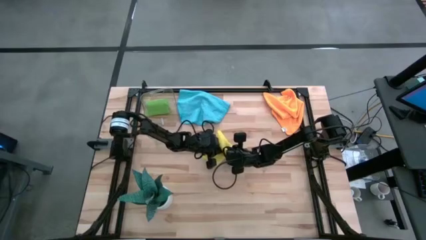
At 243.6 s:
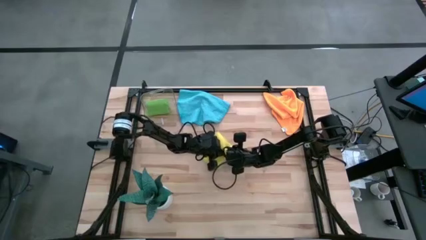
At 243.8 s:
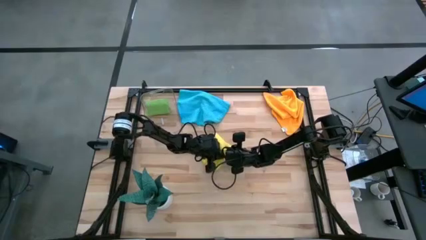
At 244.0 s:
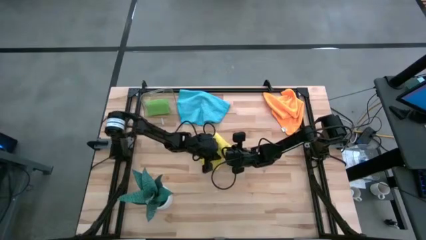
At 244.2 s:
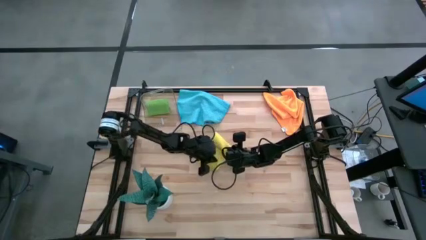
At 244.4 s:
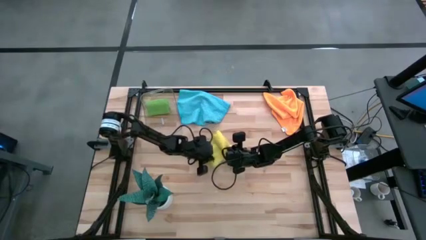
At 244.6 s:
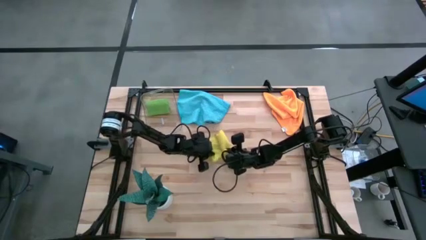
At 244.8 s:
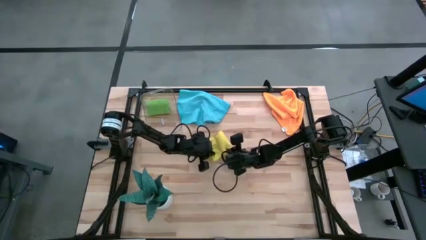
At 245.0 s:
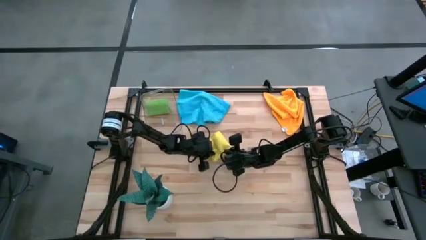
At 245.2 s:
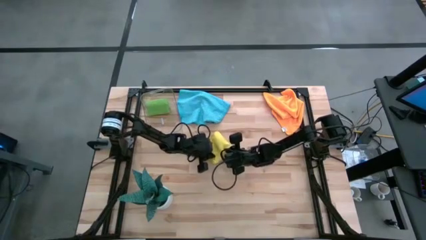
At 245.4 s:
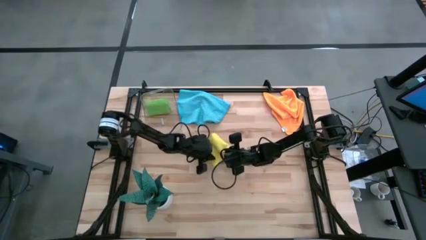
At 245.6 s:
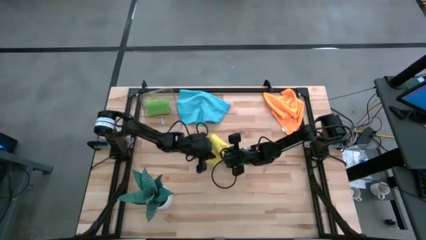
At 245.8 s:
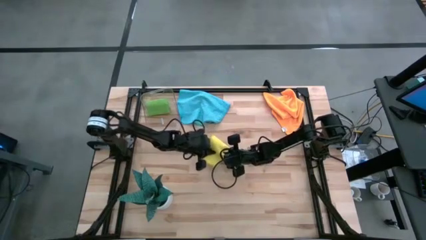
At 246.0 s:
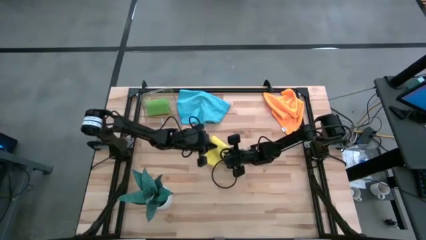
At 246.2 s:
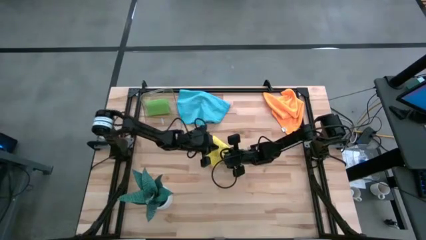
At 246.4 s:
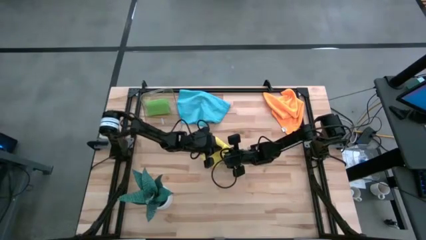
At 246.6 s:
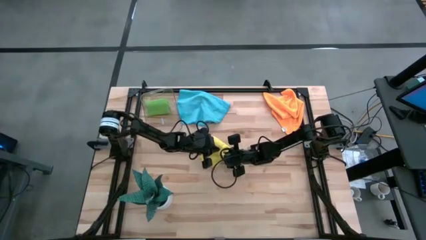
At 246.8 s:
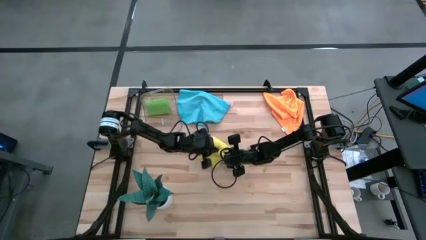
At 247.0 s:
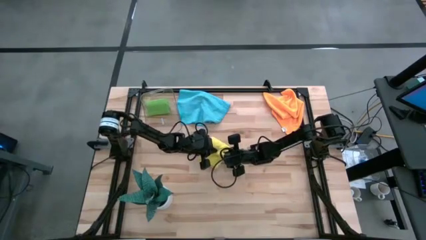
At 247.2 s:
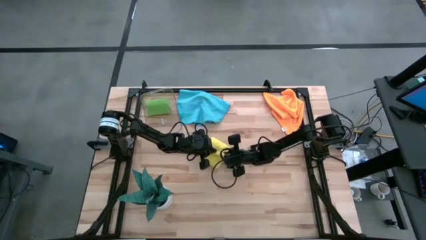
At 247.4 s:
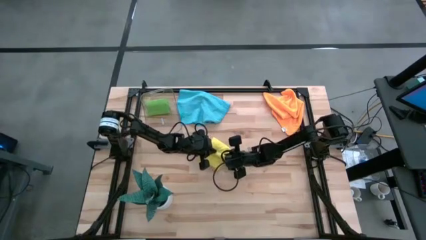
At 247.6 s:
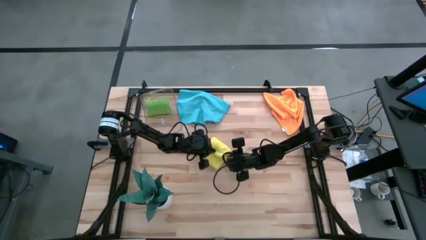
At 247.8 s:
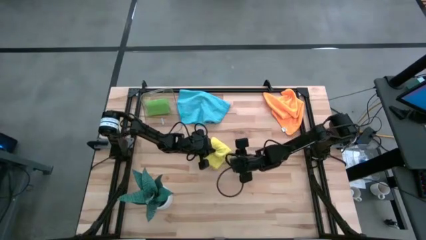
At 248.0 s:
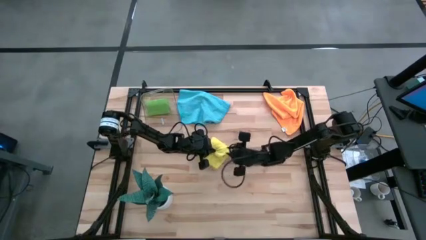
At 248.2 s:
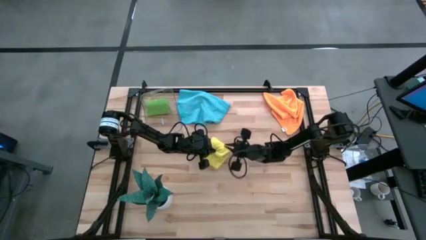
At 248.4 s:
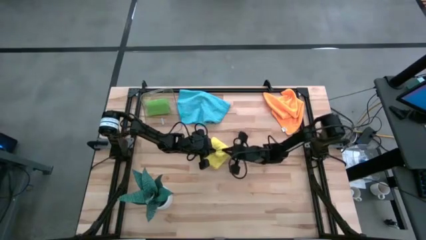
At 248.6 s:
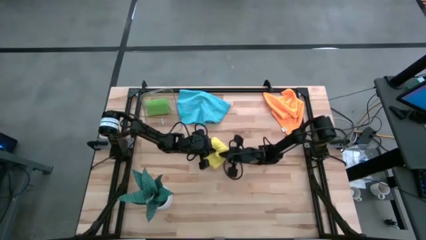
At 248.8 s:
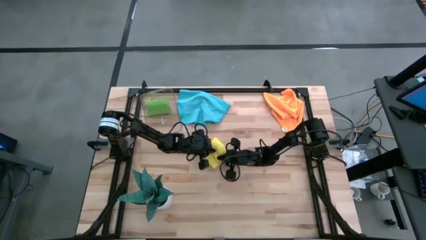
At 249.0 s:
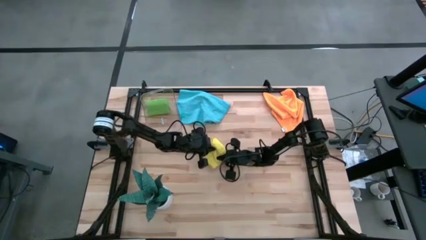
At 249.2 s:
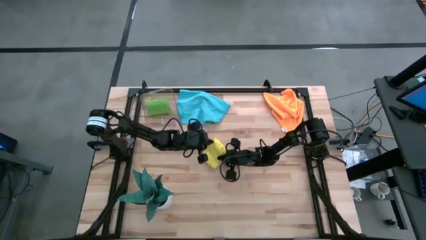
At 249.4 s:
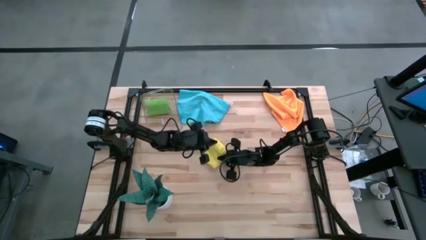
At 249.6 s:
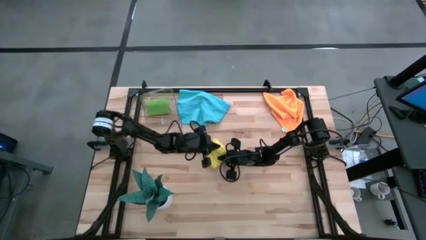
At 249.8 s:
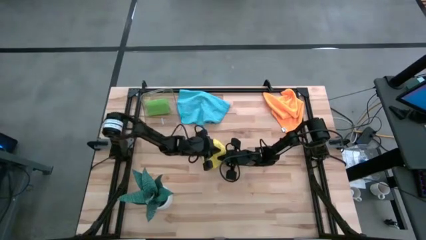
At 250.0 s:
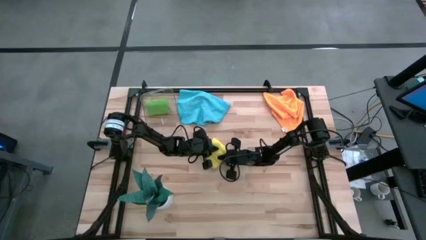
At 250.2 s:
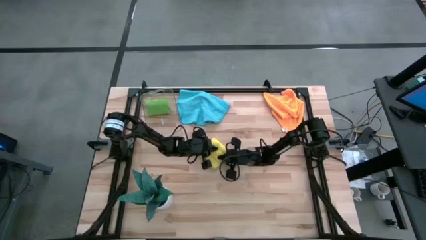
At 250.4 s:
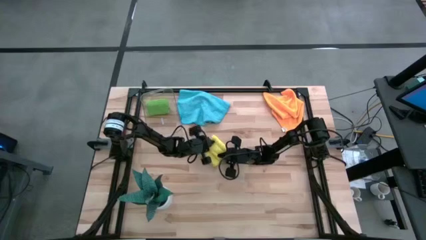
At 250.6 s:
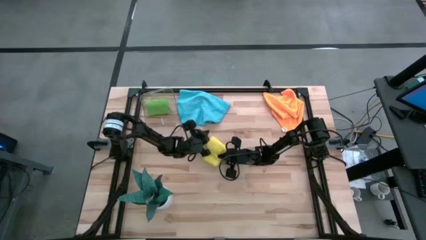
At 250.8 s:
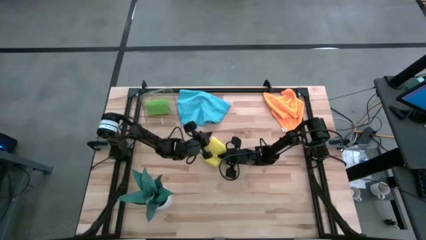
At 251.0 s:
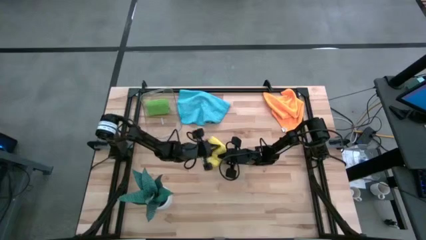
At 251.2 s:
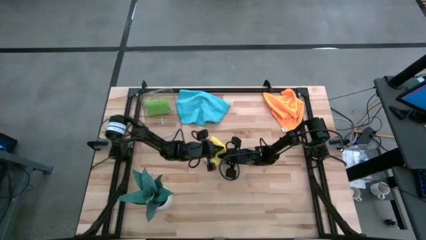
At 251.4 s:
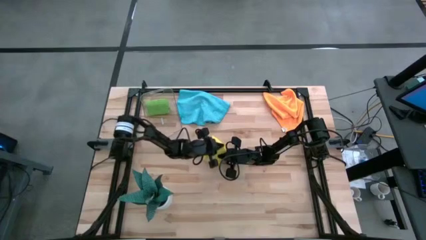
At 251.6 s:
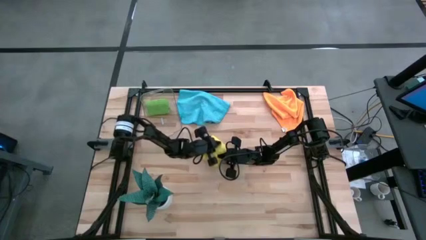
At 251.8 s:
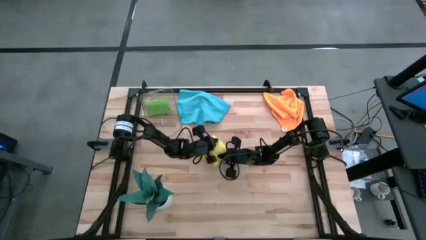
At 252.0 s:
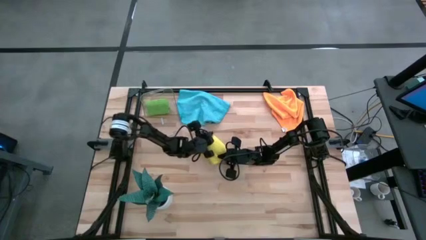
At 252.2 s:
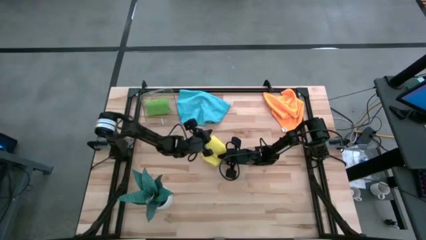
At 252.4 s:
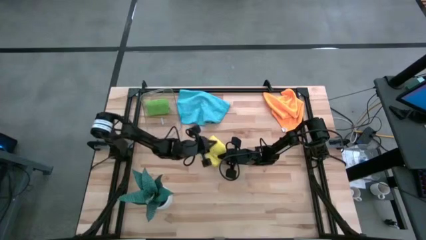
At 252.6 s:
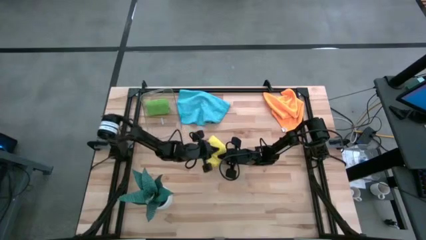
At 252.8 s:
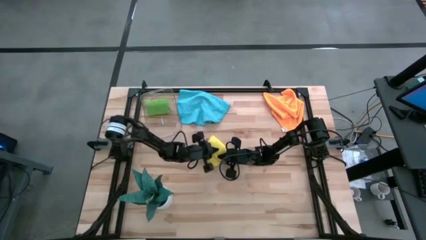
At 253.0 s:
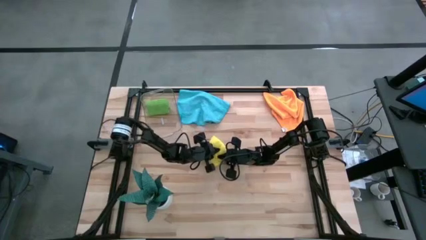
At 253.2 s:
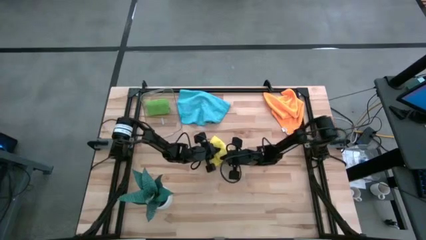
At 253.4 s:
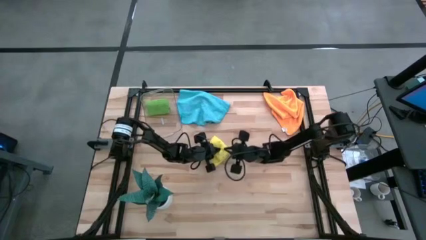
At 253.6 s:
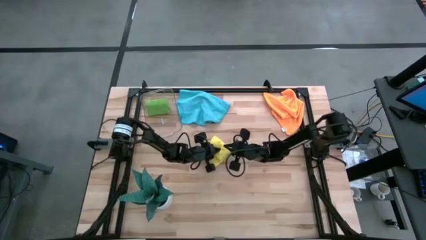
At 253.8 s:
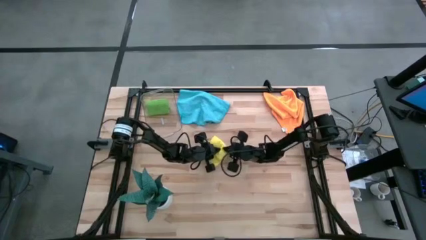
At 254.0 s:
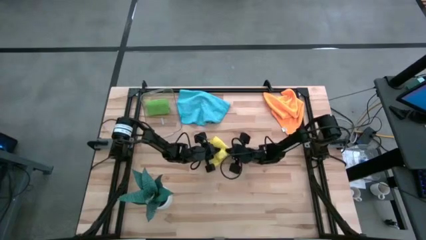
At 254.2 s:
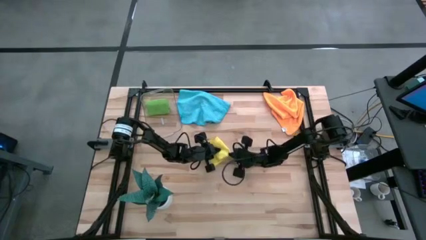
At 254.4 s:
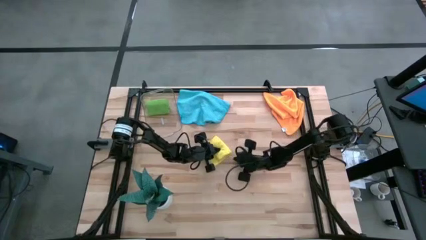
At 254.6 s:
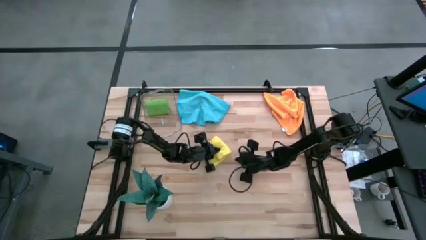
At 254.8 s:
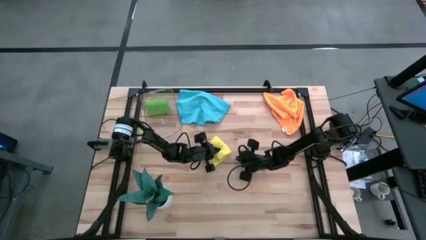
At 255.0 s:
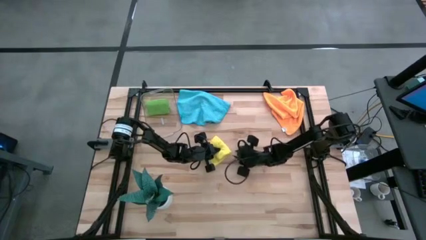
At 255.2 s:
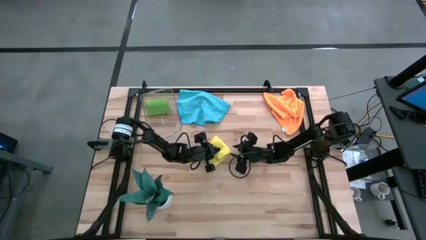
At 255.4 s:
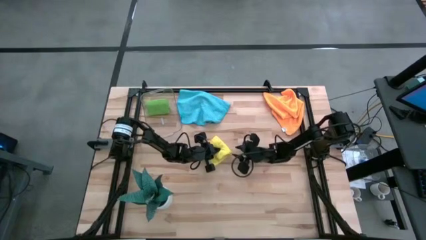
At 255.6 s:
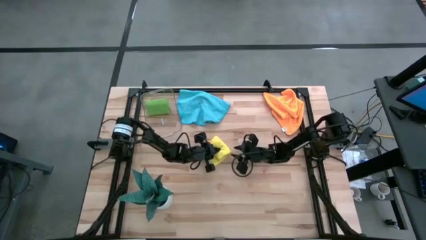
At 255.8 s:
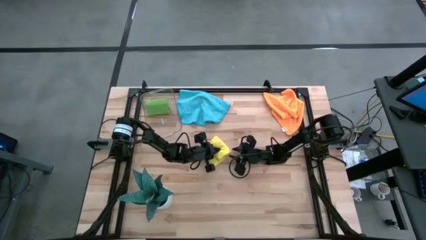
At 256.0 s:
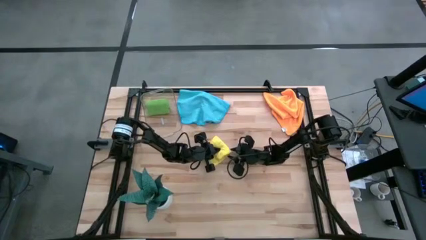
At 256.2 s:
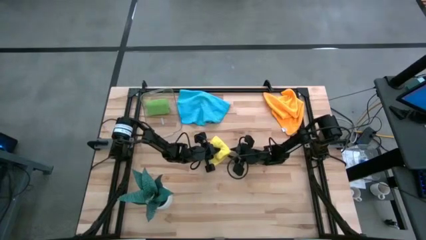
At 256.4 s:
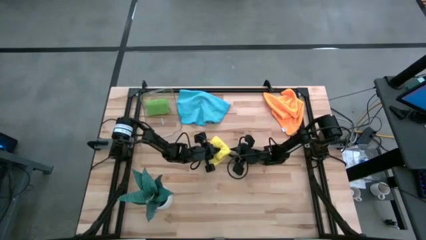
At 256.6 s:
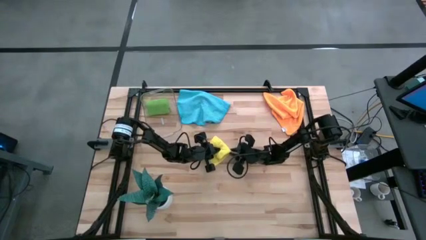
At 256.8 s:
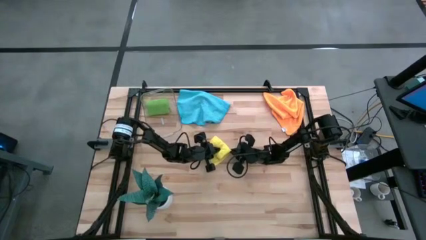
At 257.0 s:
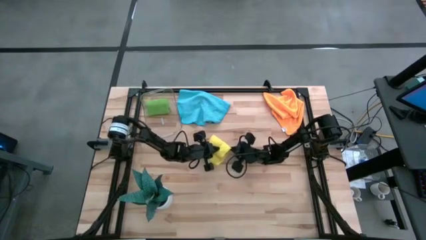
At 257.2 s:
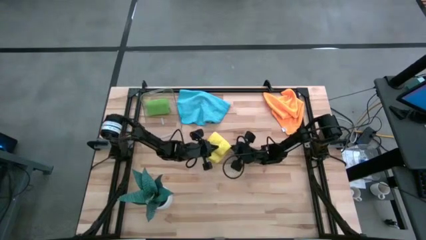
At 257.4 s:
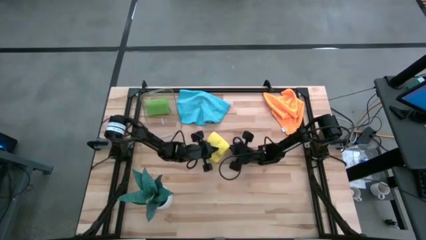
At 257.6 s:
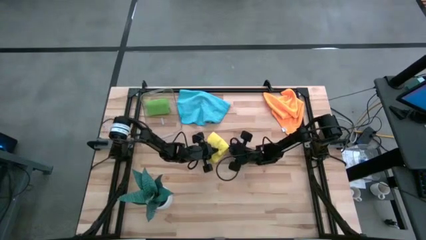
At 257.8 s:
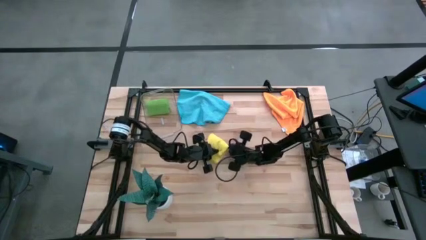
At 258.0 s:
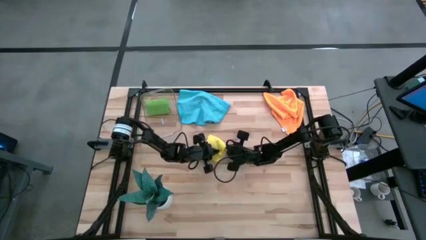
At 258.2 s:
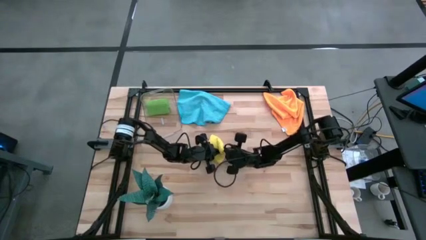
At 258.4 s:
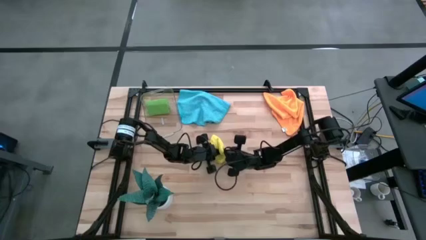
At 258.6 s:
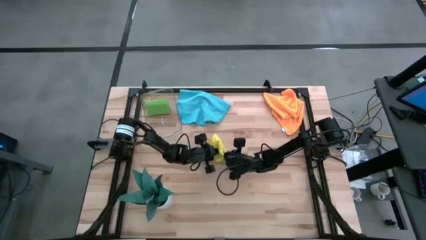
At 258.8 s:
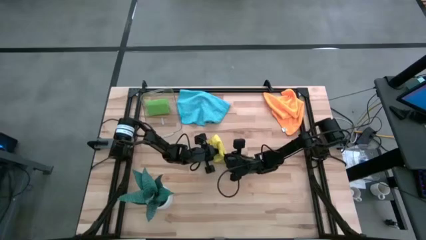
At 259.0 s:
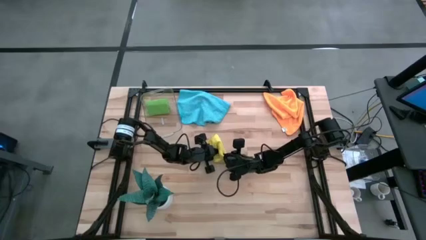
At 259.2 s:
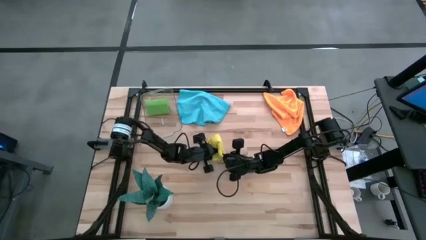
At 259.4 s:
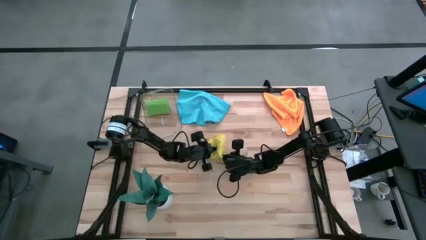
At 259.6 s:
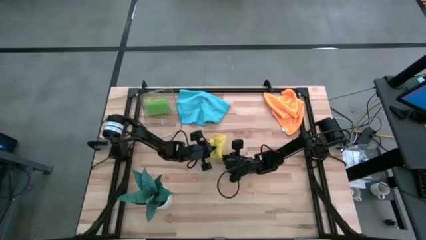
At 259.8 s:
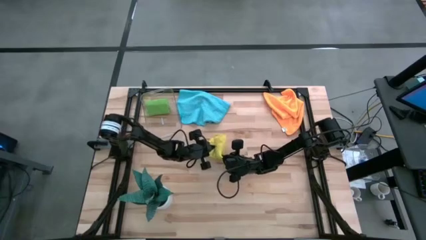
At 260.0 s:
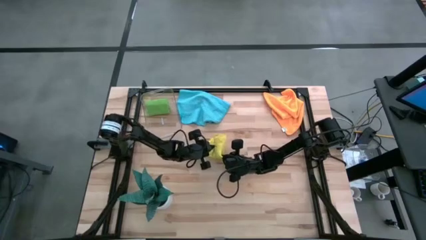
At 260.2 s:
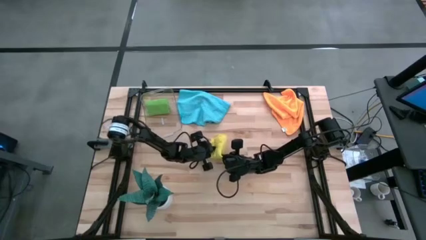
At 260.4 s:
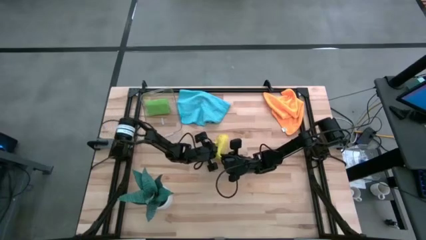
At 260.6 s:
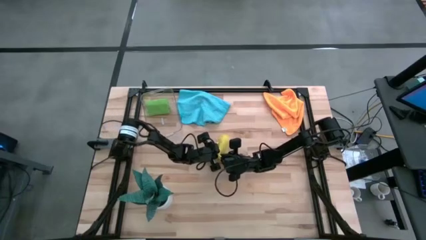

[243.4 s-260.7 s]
Task: Roll microfiber towels into tight, uniform cylinder then place into a basket
Roll the yellow microfiber towel
